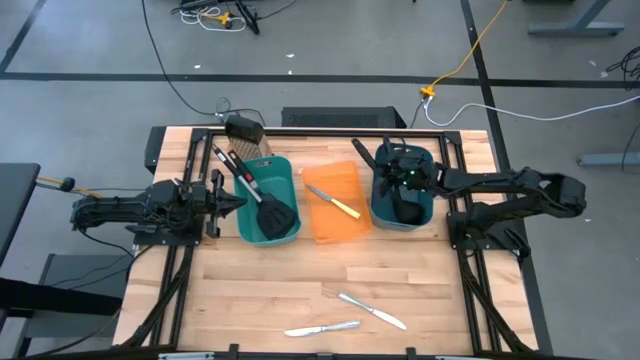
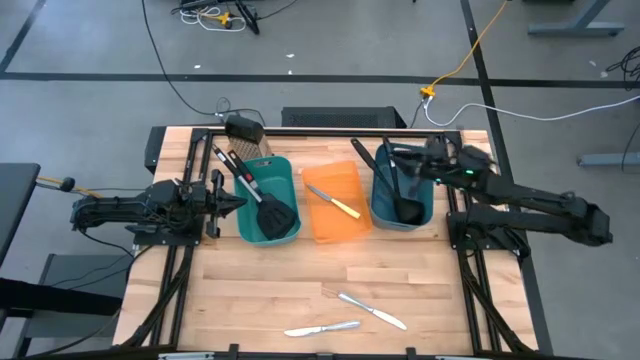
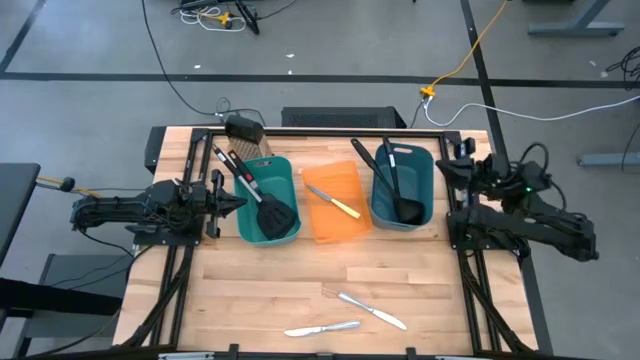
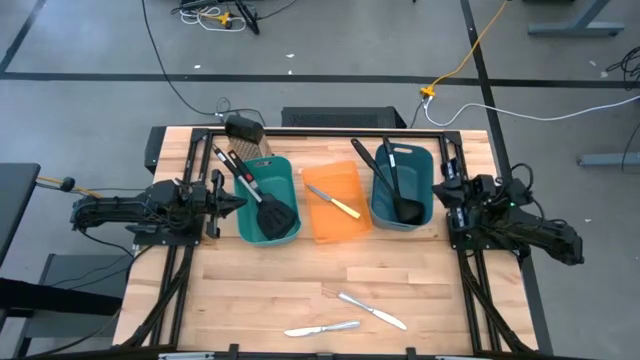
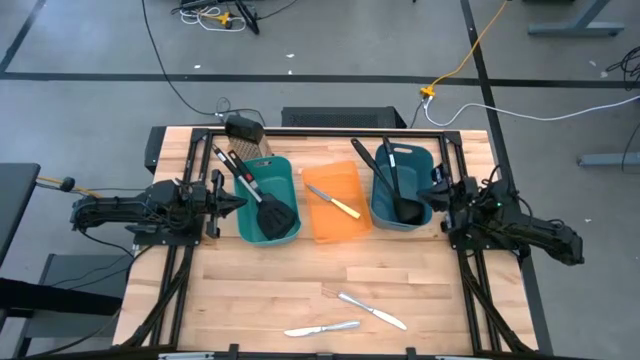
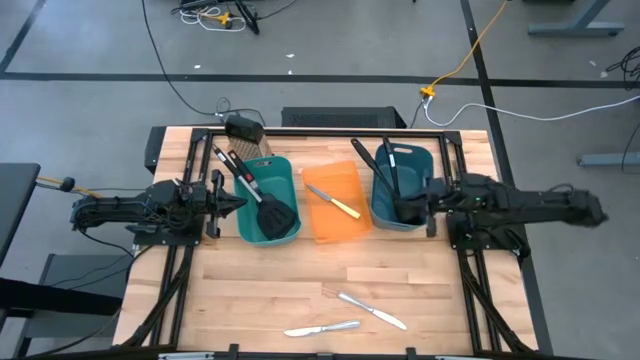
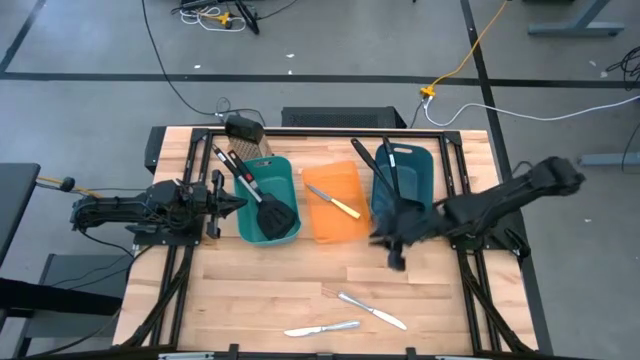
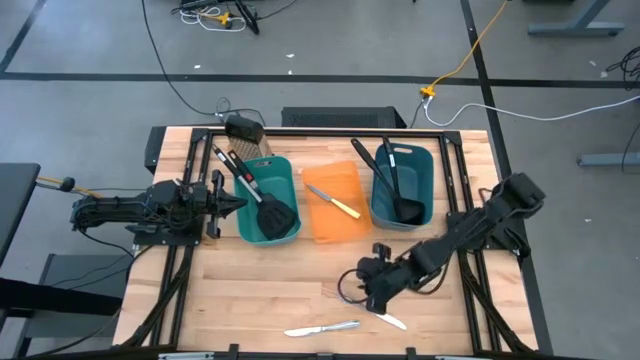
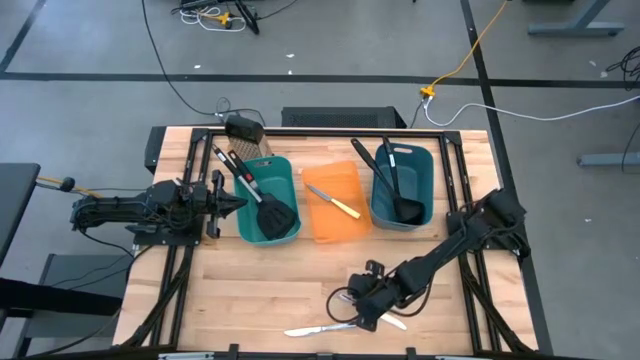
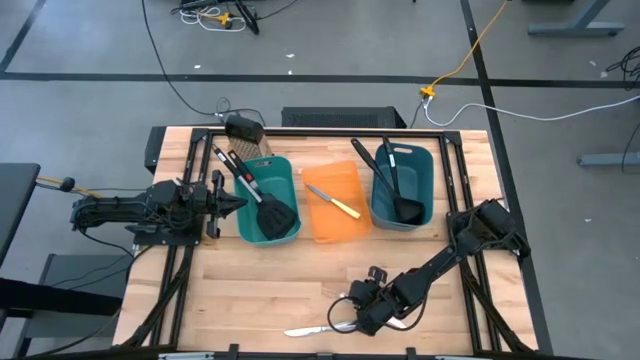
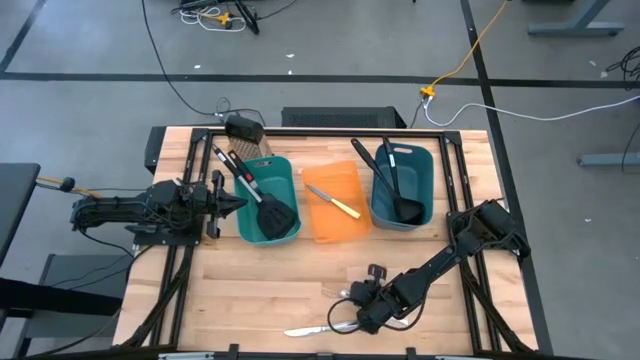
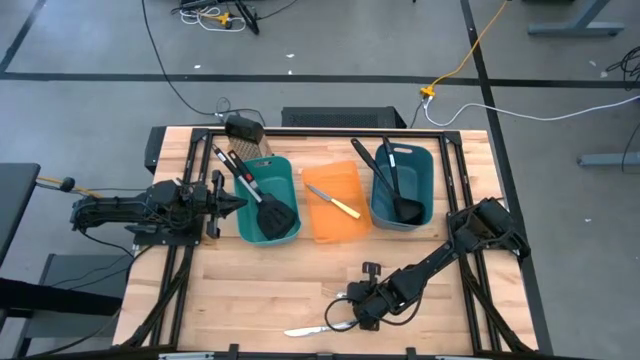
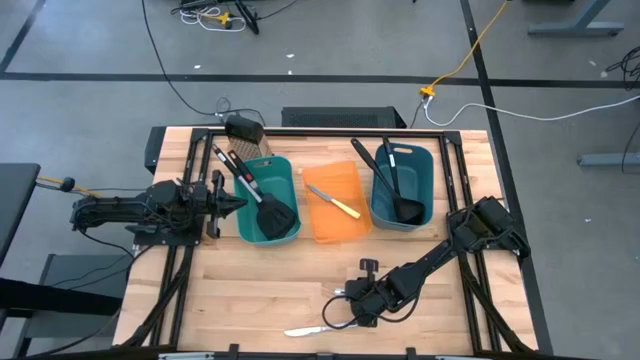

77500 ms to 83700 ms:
Task: Pick & Place Kitchen Items
Put the silver table knife into the orange bin

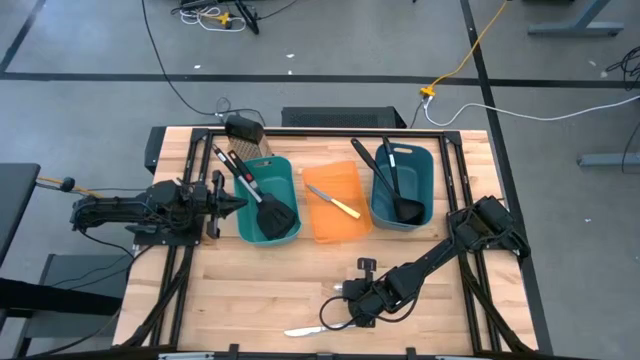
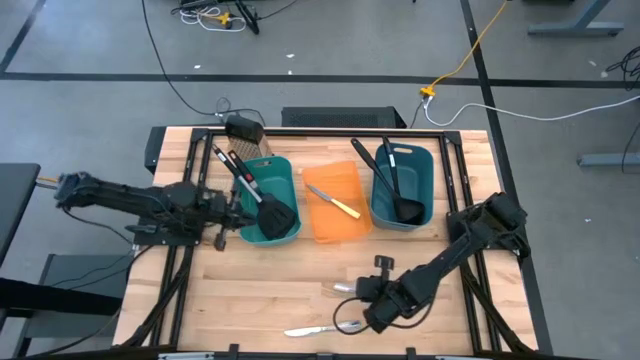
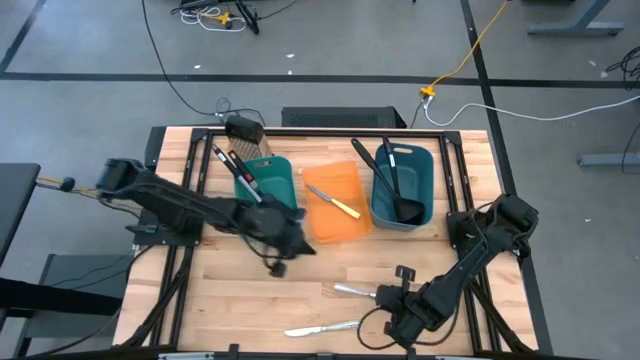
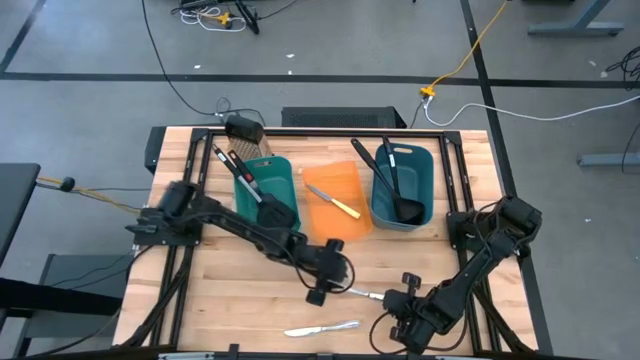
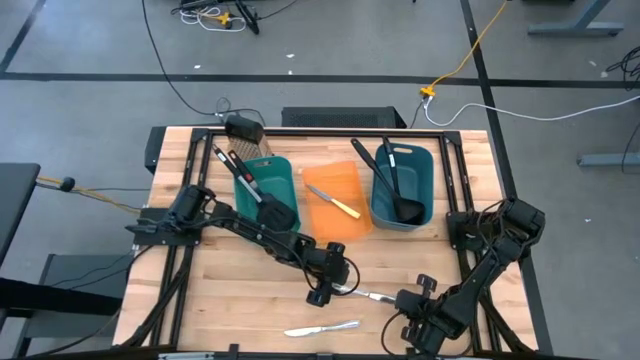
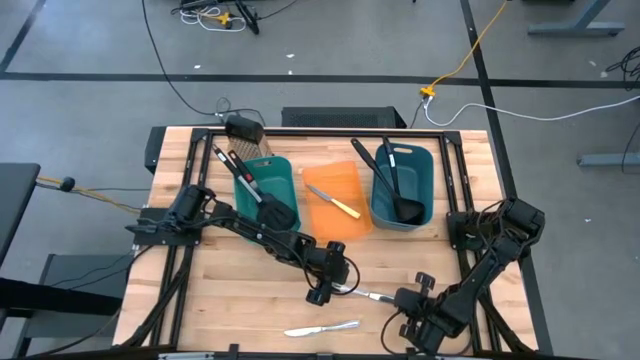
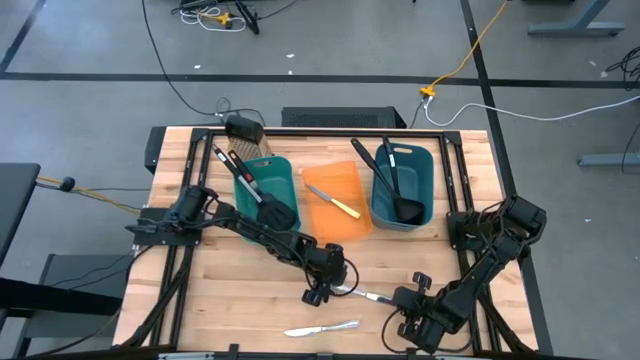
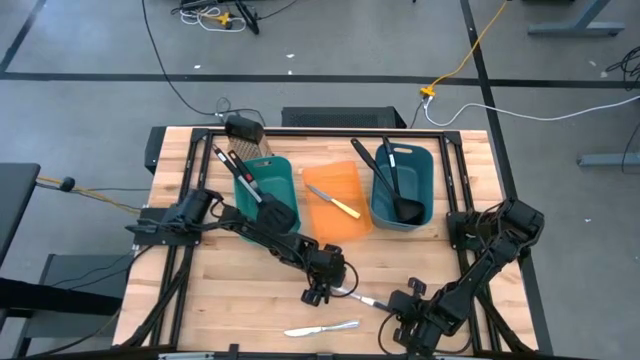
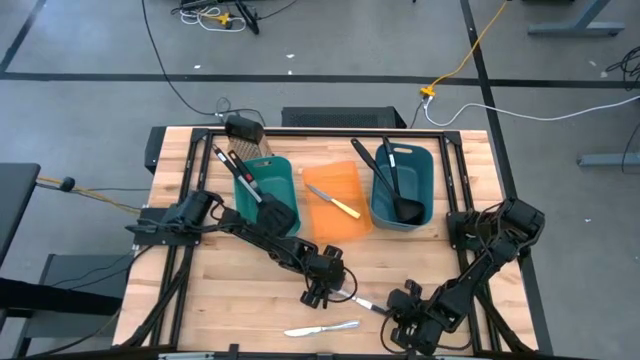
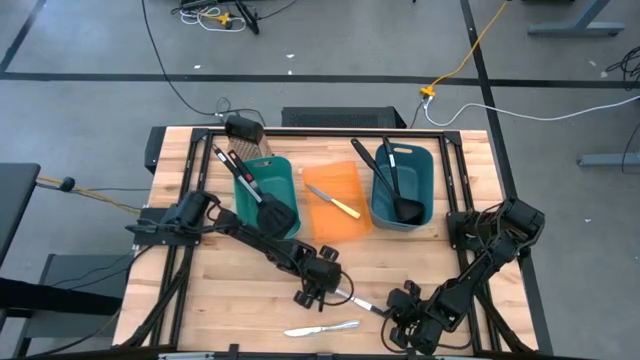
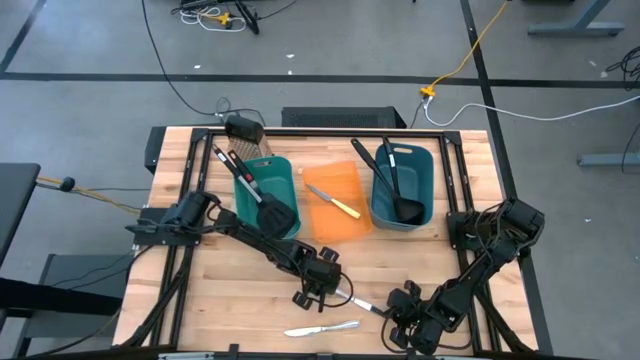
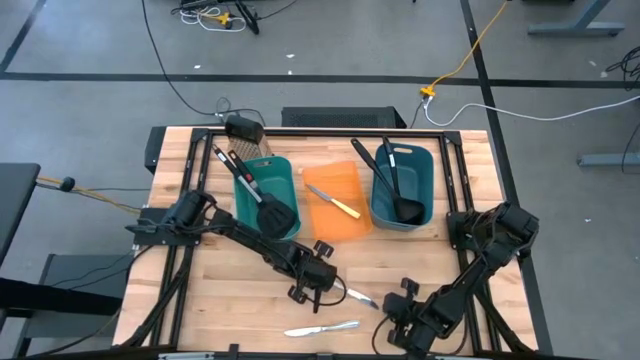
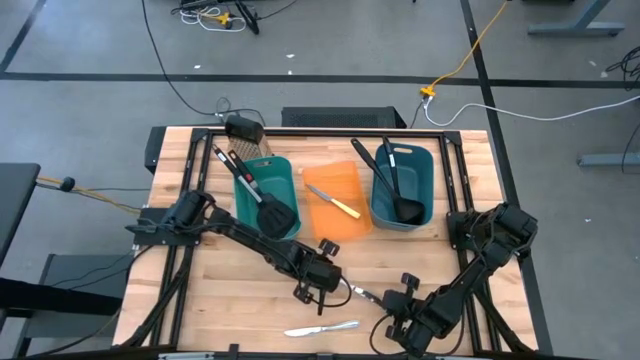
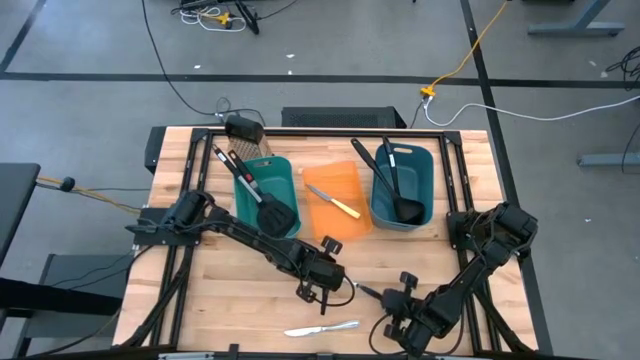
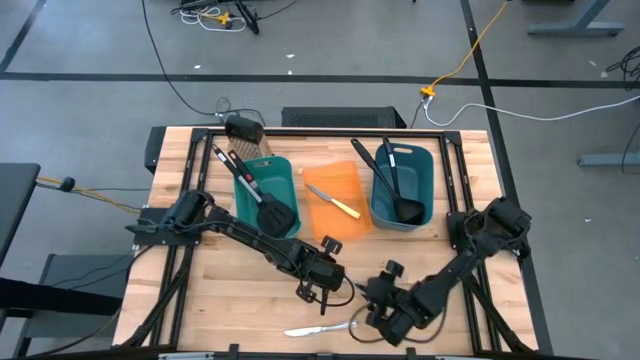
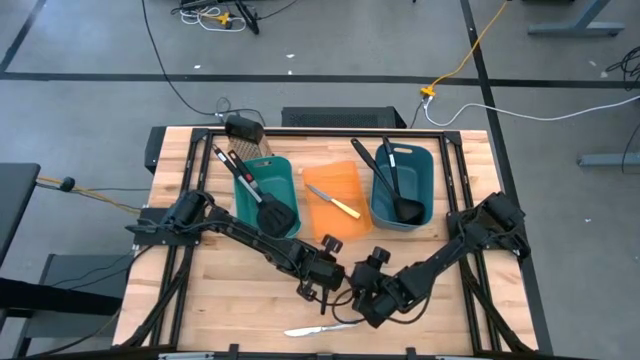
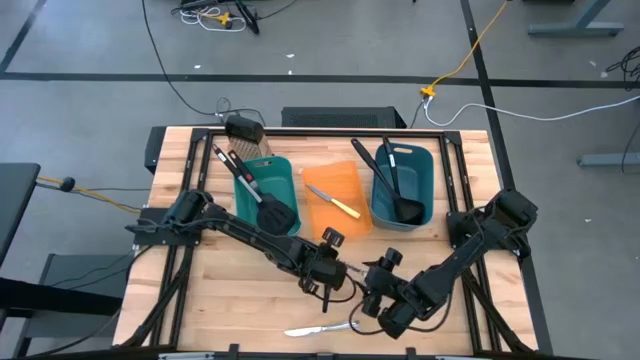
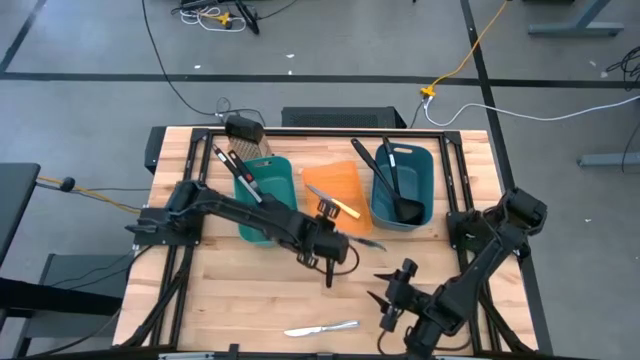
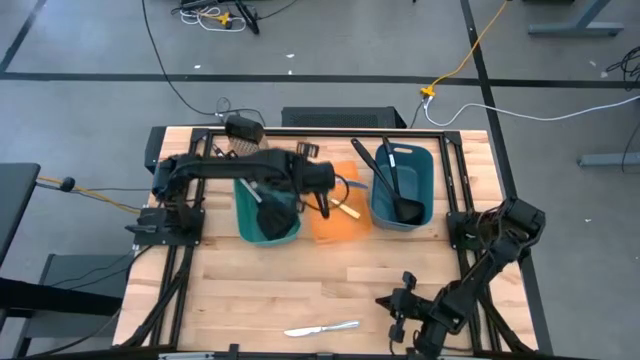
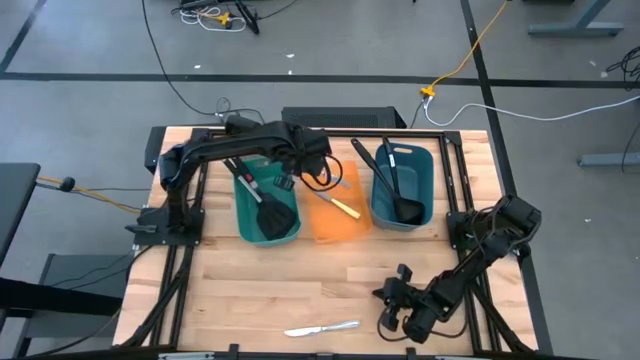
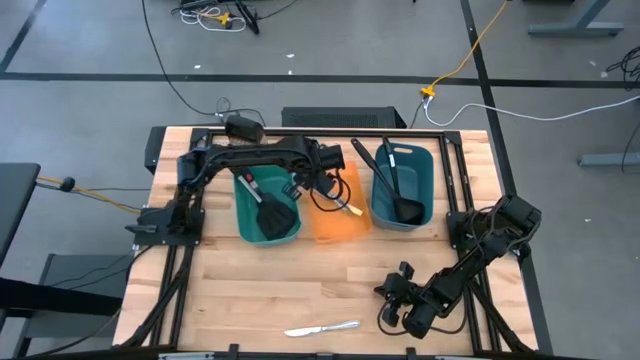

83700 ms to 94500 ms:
Put the silver table knife into the orange bin

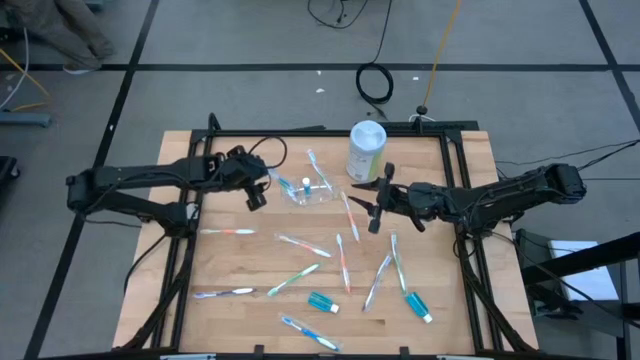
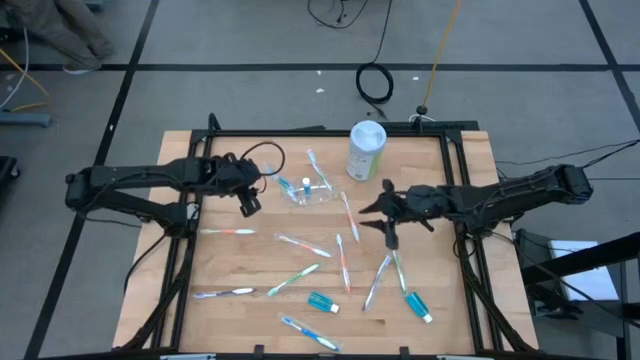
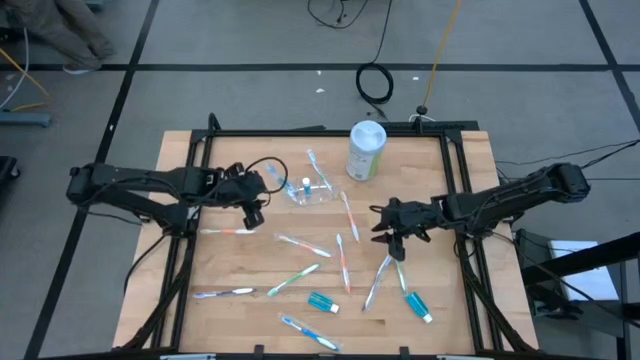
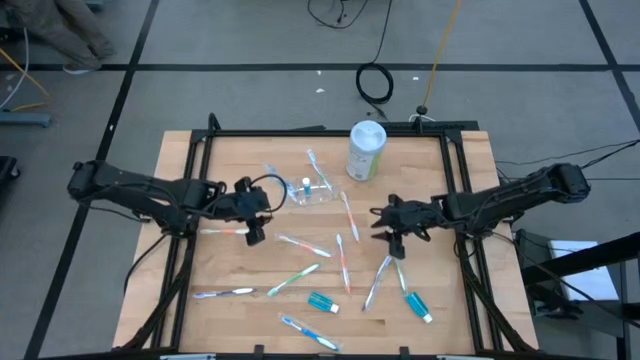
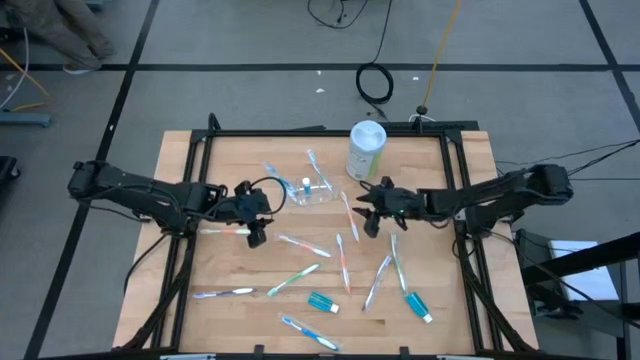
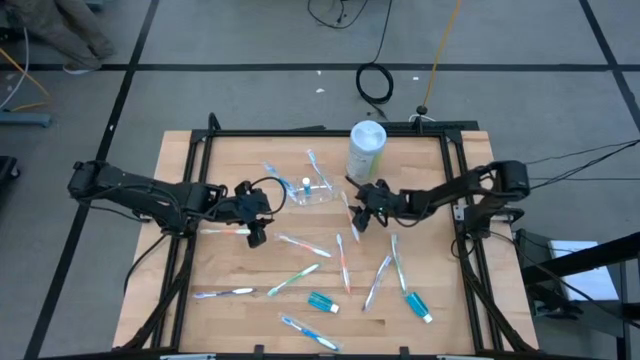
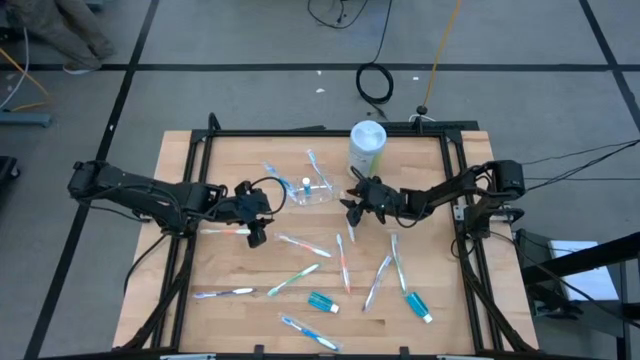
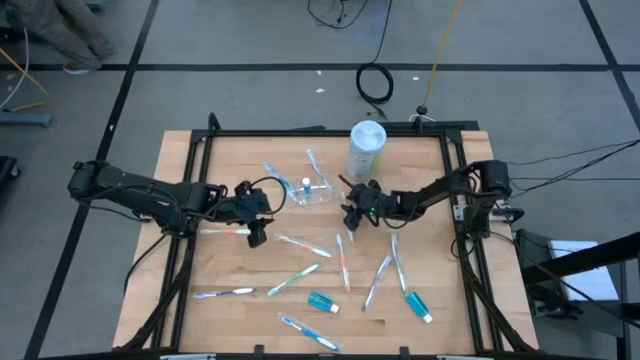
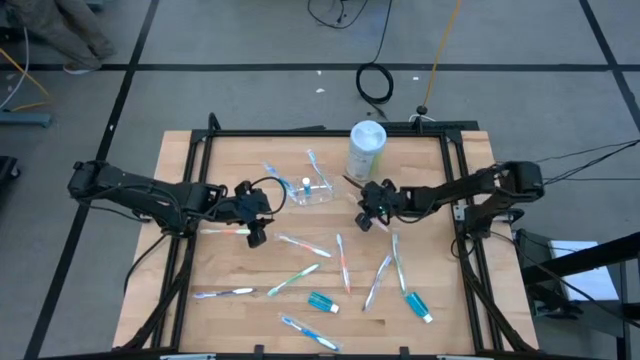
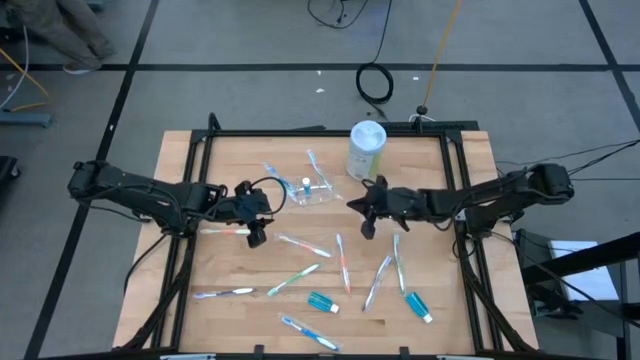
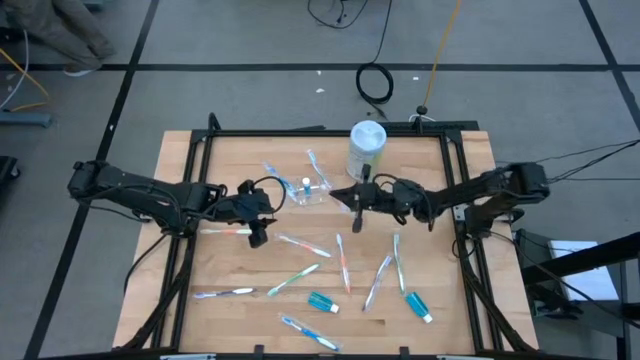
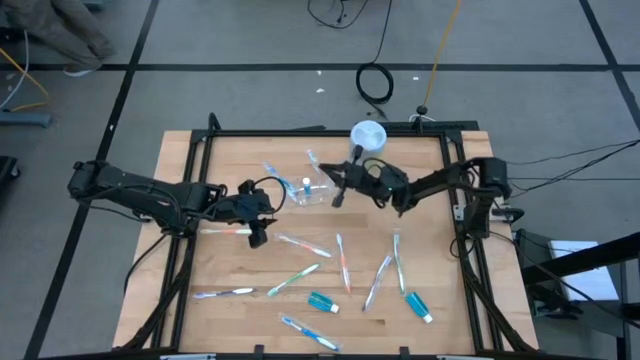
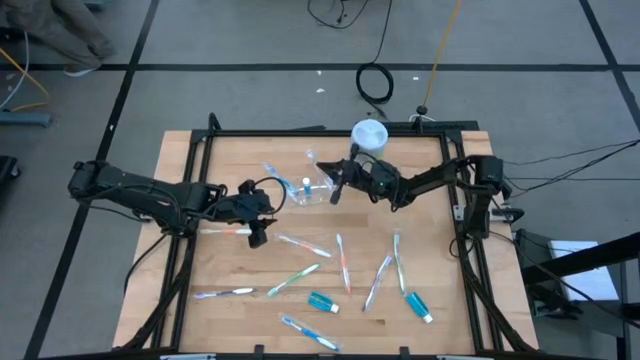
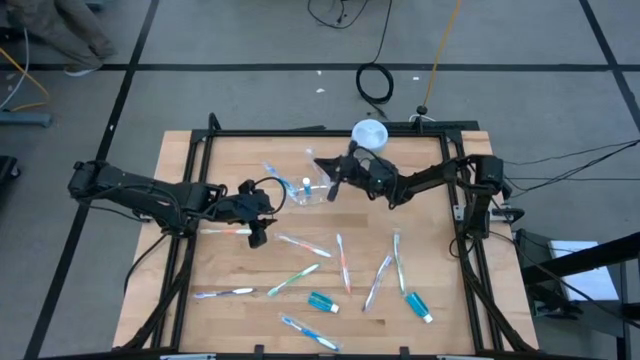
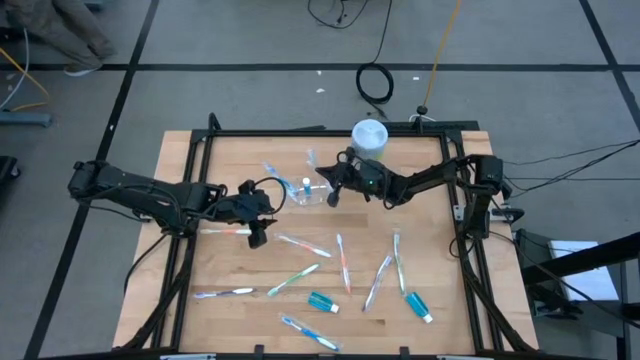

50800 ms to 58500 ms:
Task: Pick & Place toothbrushing station
Put the orange toothbrush into the transparent organizer
